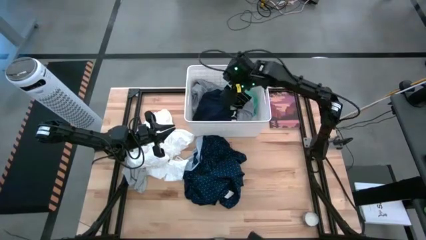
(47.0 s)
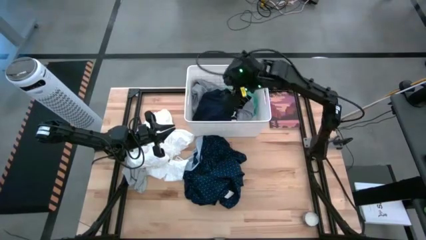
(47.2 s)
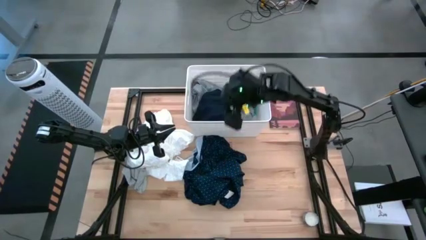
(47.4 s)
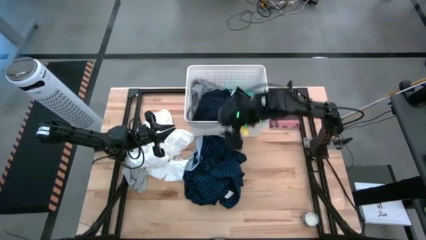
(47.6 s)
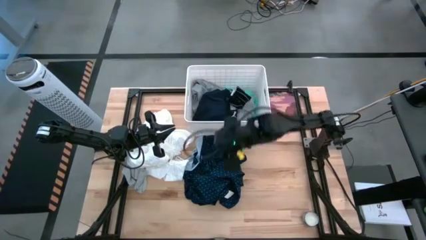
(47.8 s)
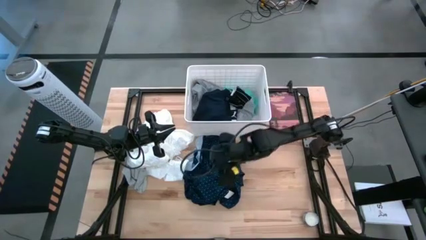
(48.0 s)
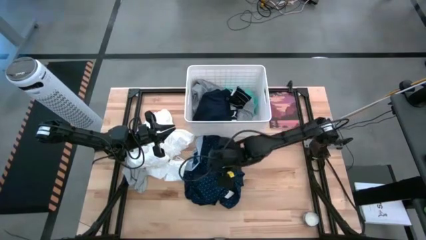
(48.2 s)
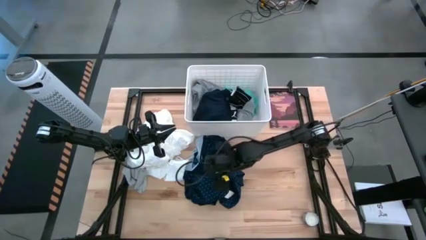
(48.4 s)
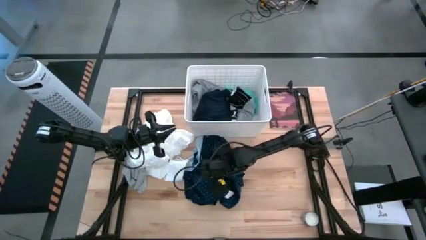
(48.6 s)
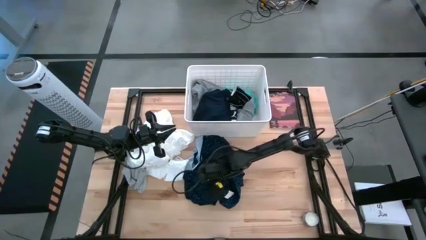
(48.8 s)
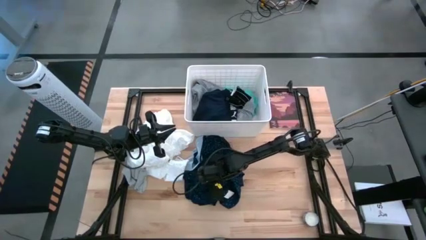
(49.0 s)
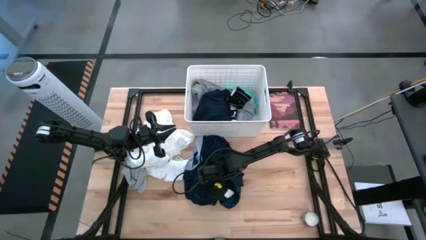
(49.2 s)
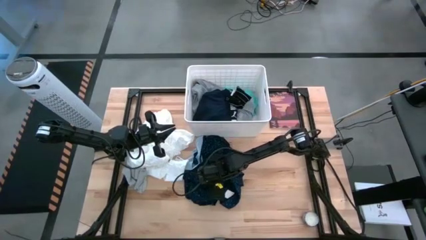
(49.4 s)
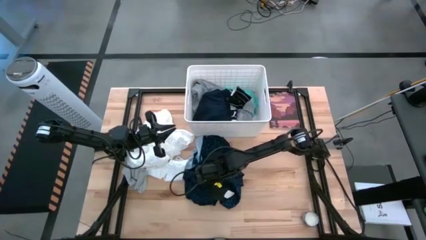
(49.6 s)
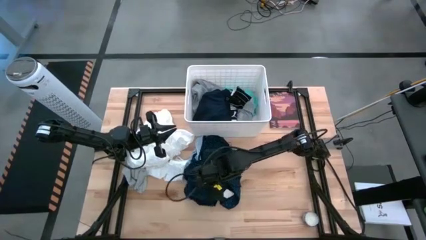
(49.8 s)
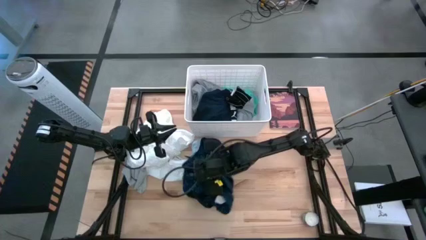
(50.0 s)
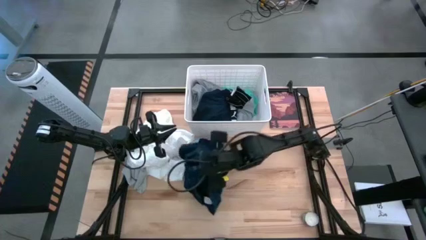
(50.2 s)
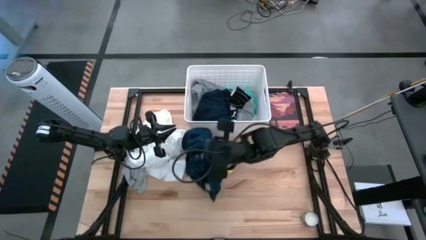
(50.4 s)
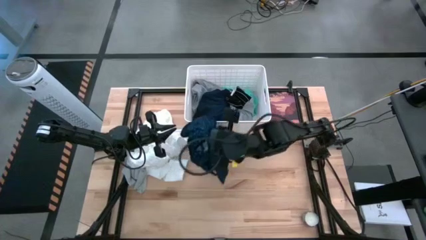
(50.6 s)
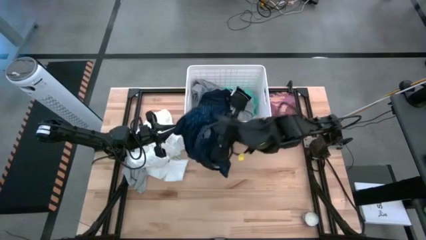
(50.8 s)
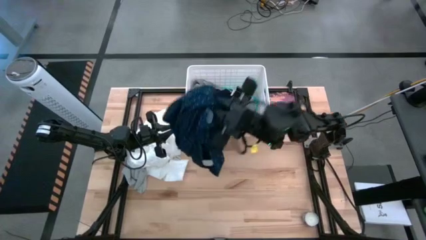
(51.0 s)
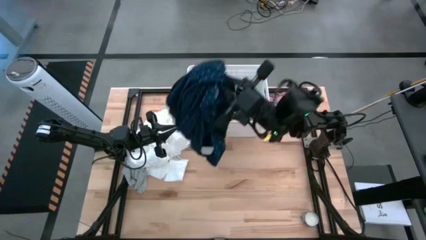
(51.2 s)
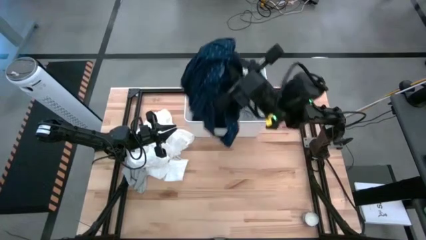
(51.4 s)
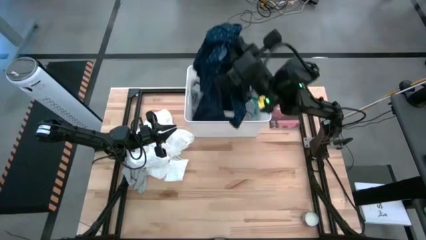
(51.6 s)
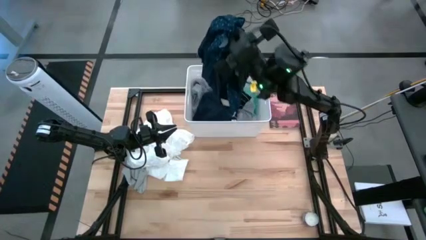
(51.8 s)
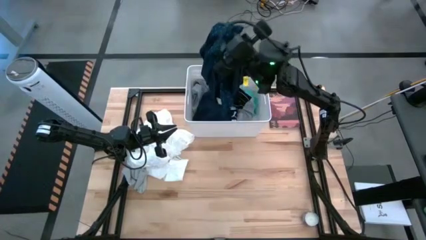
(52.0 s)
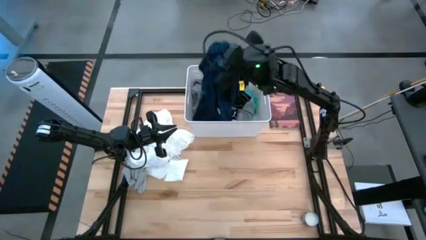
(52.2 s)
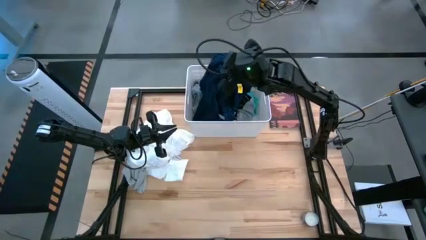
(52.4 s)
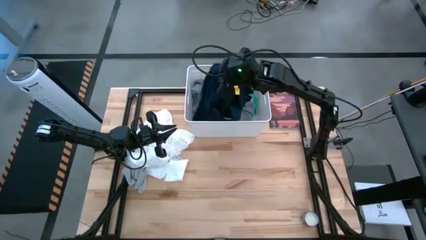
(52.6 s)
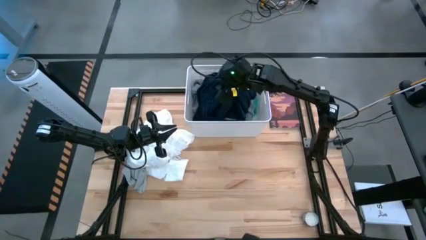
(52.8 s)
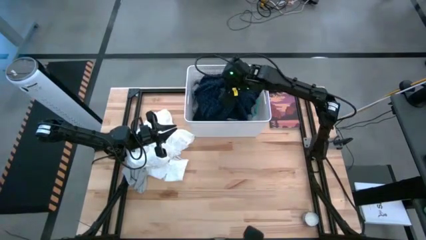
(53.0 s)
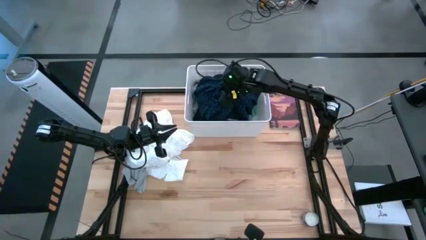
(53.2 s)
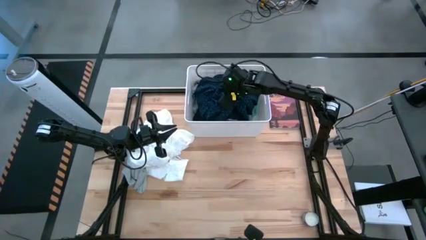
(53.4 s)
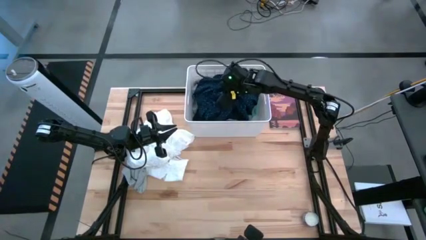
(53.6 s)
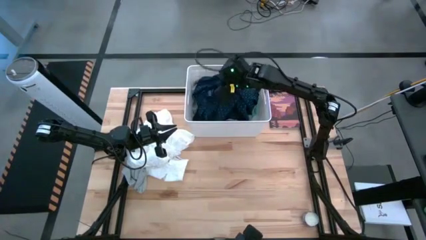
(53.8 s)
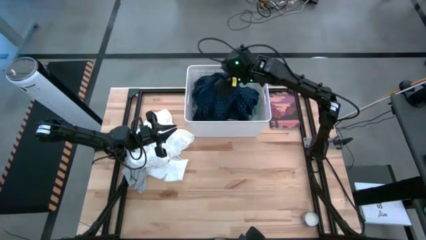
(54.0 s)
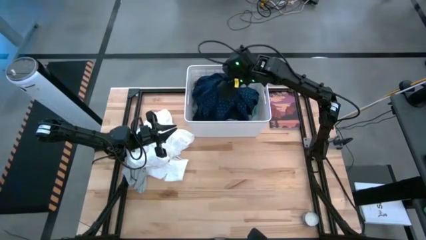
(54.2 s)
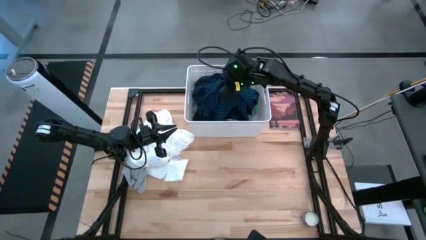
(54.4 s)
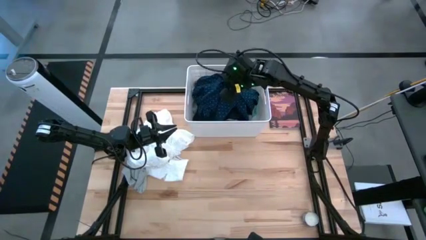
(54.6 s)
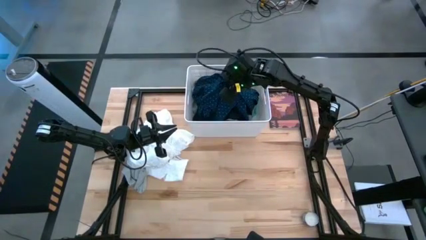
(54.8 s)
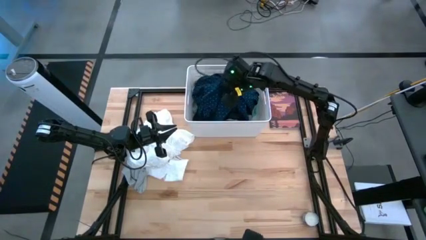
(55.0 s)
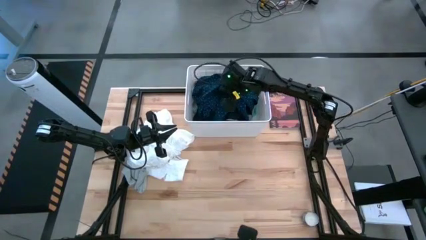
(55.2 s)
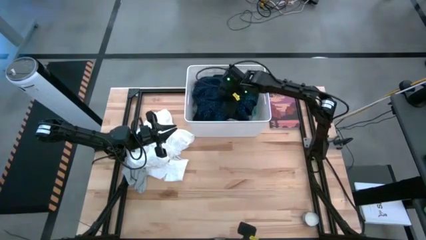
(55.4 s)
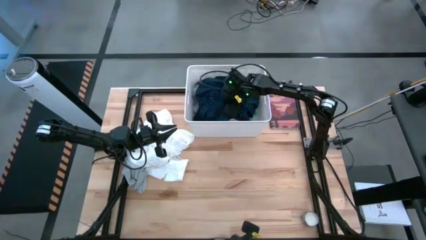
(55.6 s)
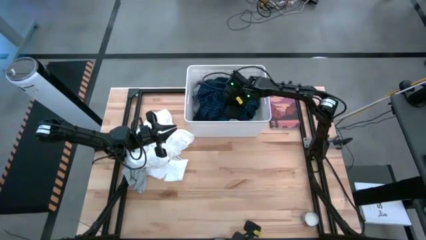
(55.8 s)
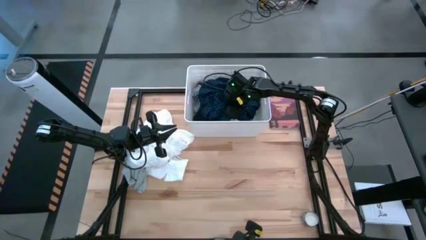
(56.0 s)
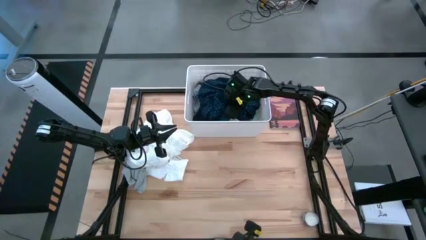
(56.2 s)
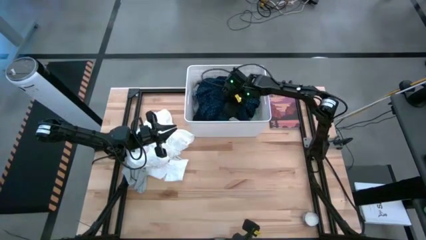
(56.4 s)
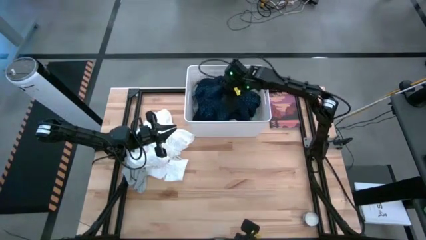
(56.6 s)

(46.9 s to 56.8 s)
Task: Sort clothes
Put the dark blue patterned polo shirt into the laundry bin

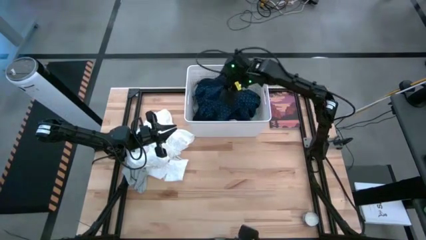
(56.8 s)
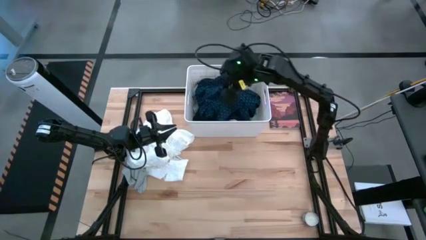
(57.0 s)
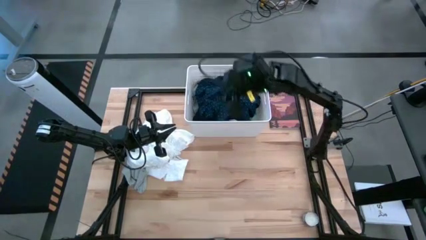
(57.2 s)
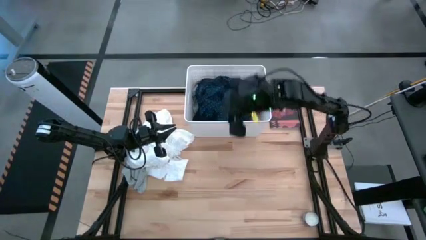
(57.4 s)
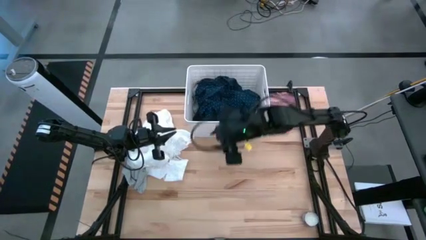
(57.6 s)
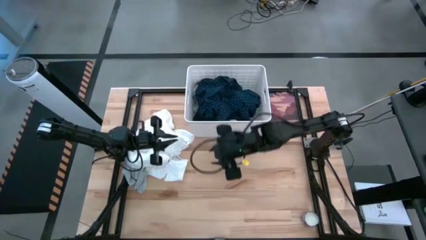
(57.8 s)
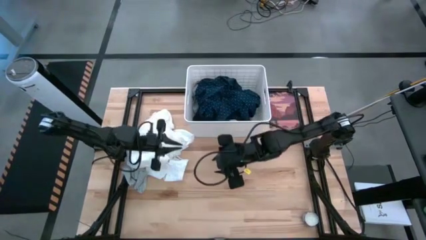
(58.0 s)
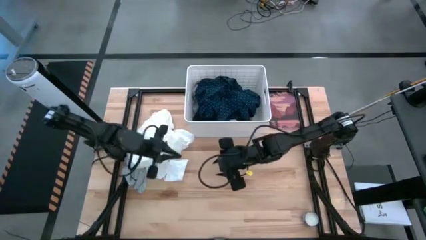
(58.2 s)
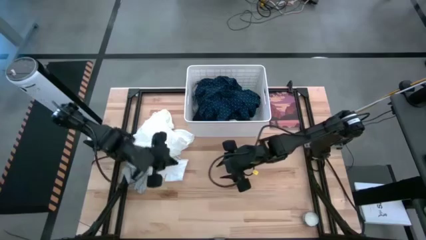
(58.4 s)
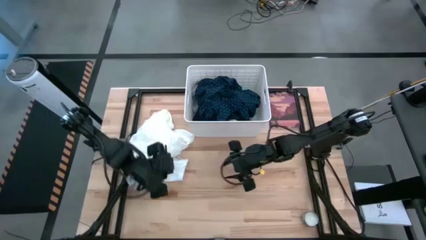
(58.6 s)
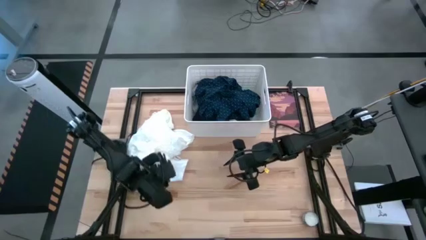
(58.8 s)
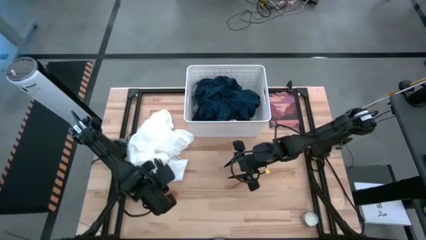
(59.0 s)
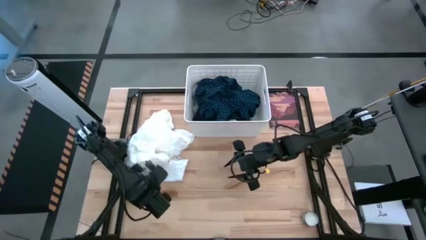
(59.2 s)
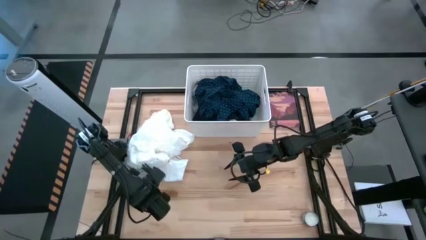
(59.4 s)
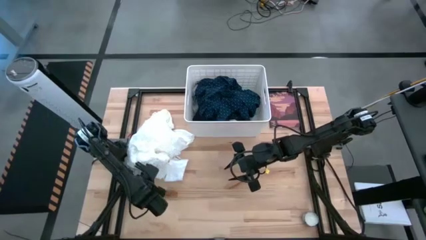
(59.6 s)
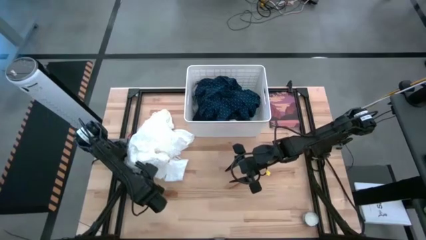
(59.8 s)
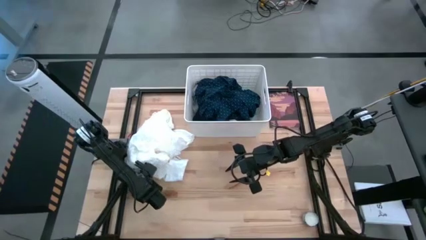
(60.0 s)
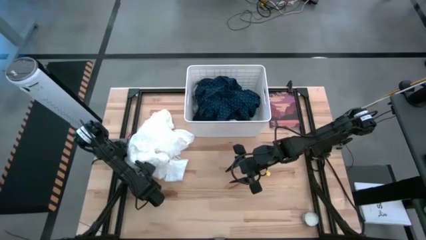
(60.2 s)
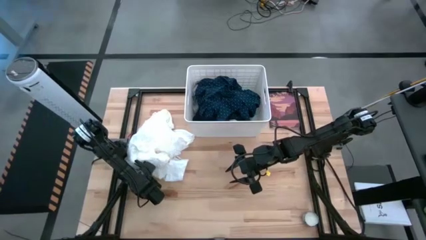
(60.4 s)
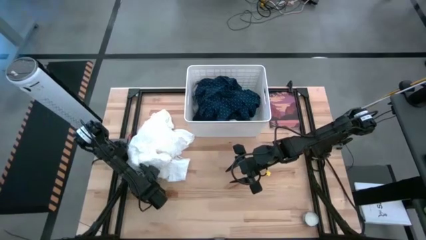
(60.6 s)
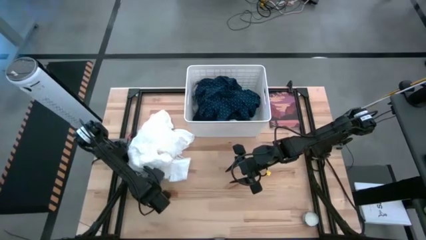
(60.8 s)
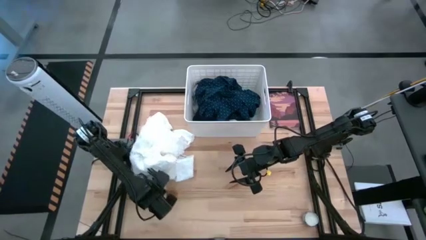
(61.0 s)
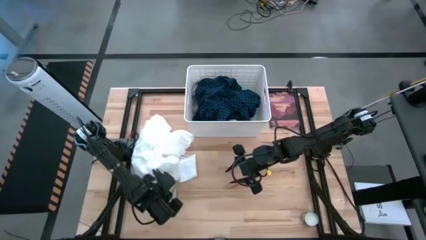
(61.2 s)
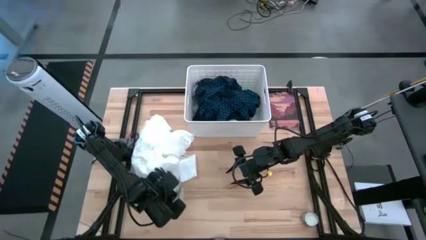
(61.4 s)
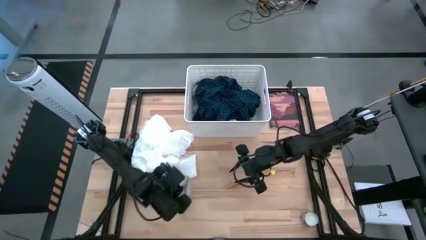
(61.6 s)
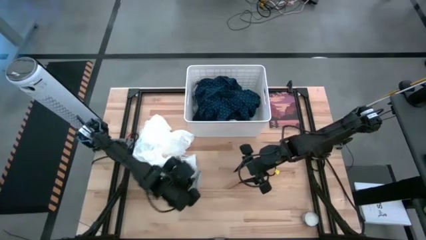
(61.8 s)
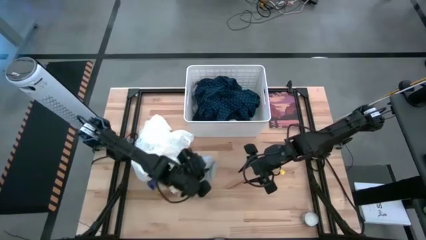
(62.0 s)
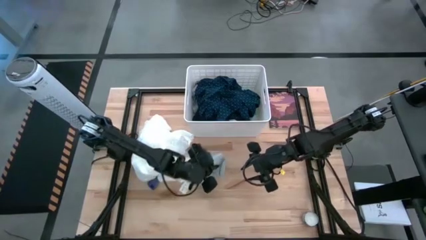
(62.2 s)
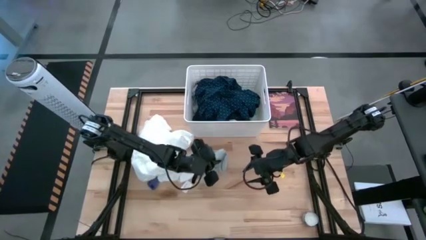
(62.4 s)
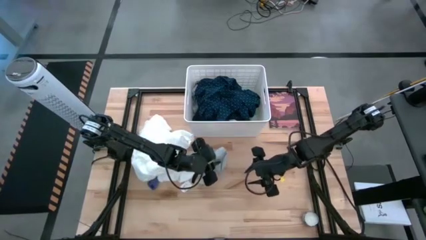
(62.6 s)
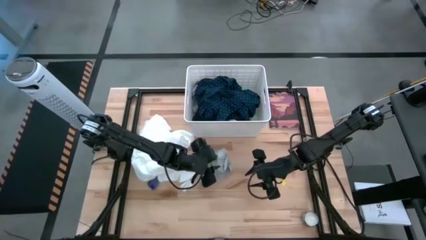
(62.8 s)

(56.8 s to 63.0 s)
Move the gray socks to the center of the table
